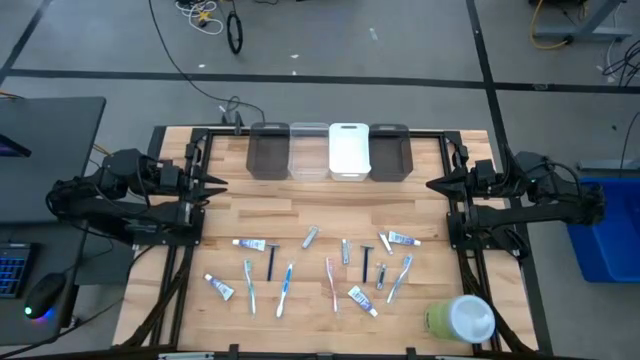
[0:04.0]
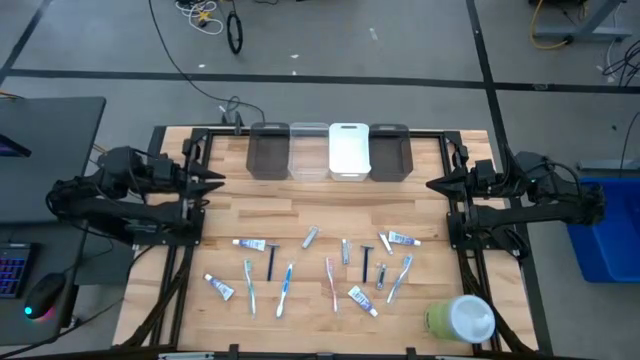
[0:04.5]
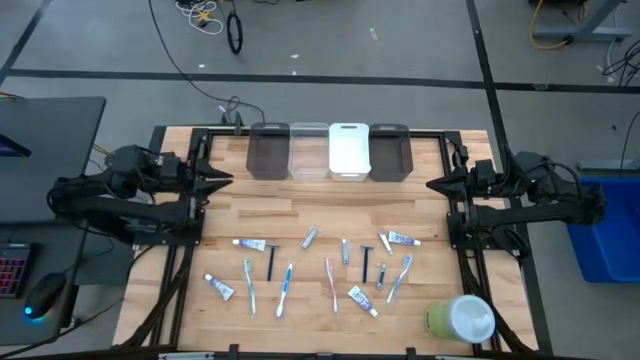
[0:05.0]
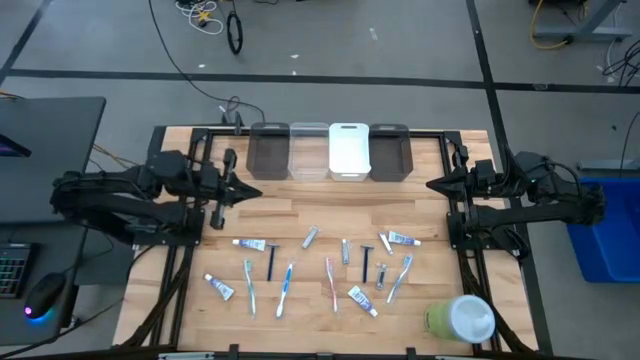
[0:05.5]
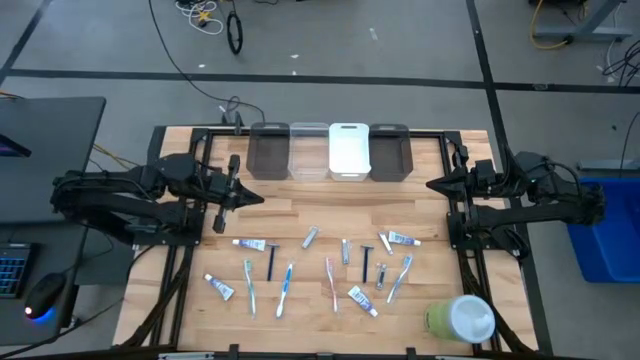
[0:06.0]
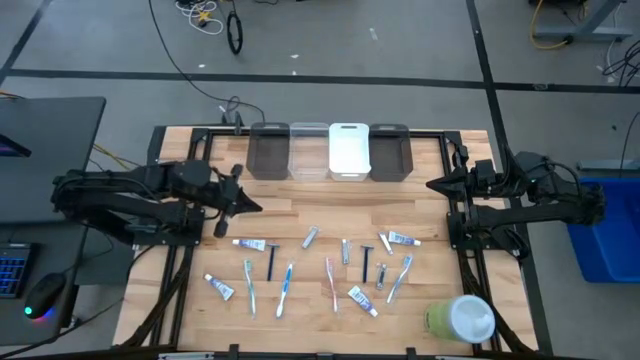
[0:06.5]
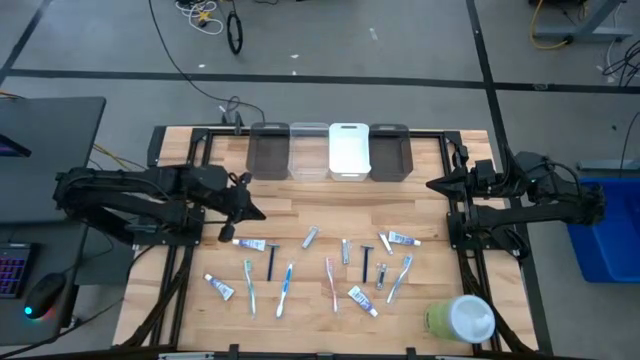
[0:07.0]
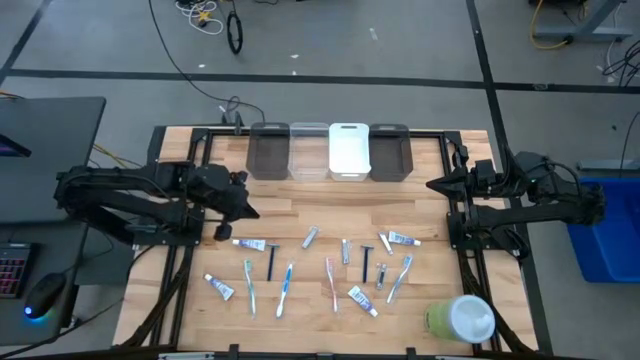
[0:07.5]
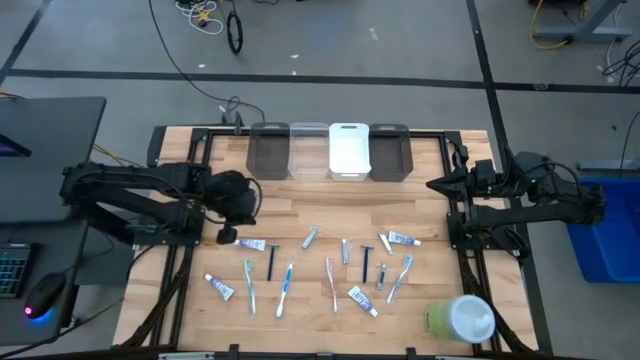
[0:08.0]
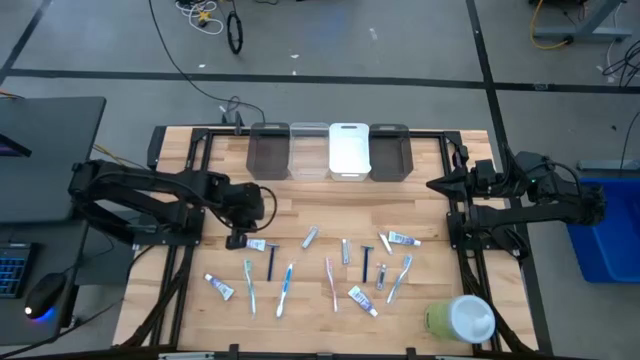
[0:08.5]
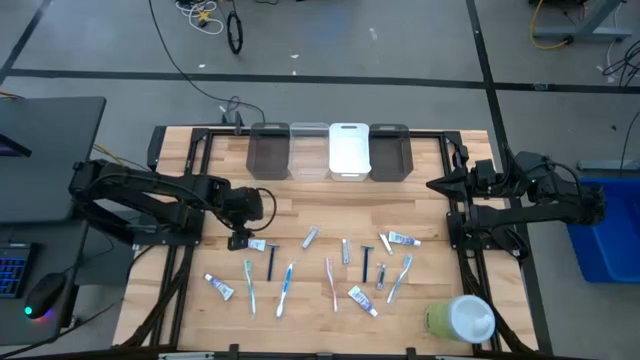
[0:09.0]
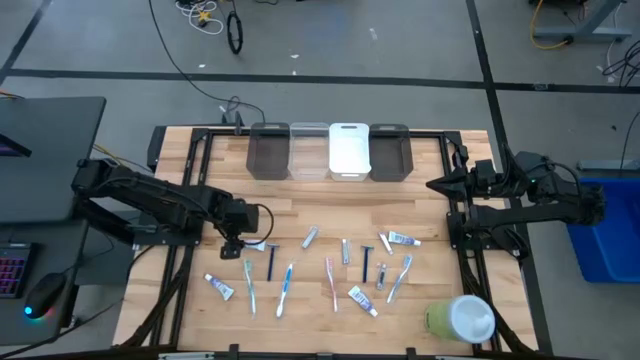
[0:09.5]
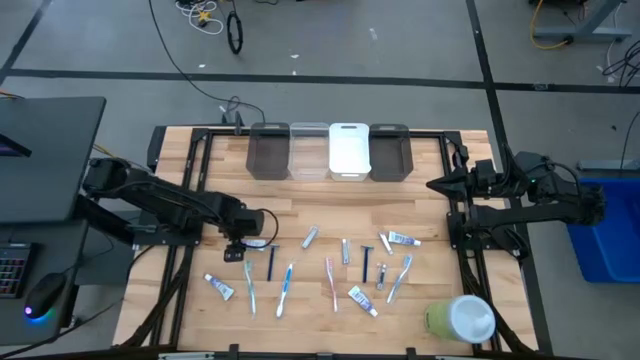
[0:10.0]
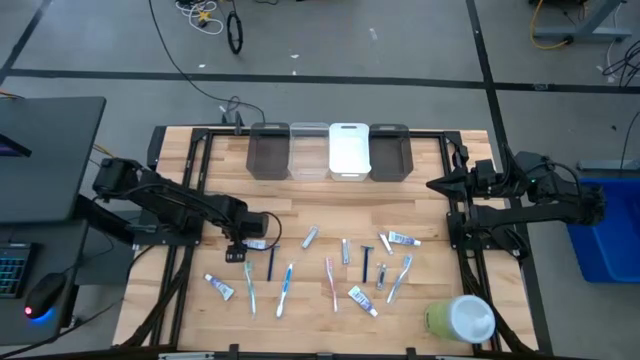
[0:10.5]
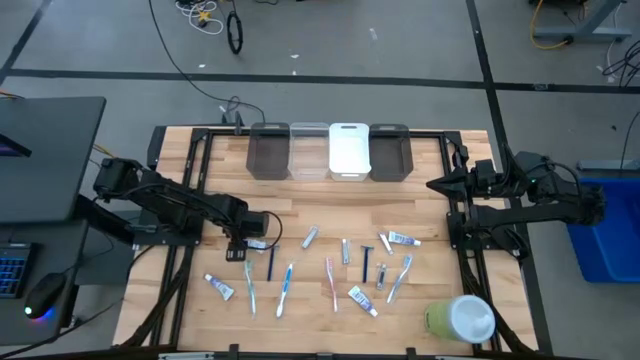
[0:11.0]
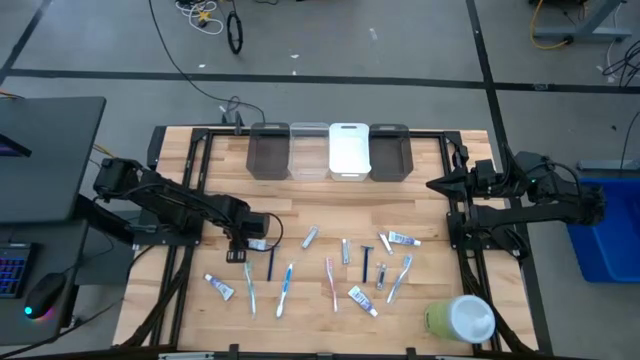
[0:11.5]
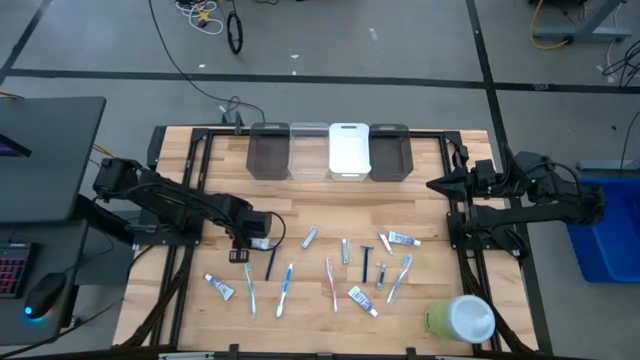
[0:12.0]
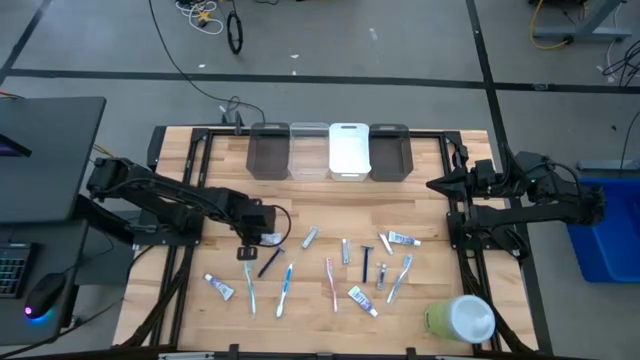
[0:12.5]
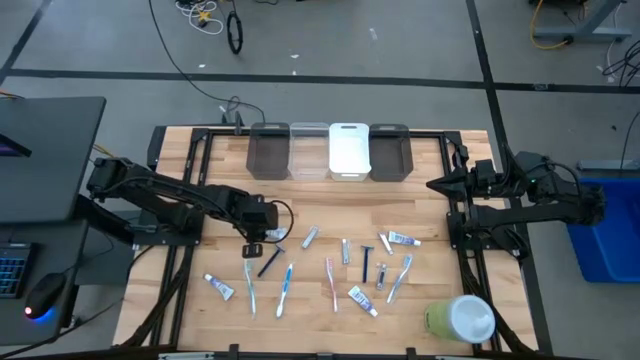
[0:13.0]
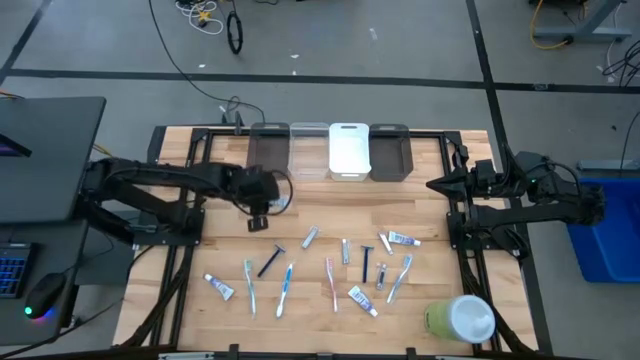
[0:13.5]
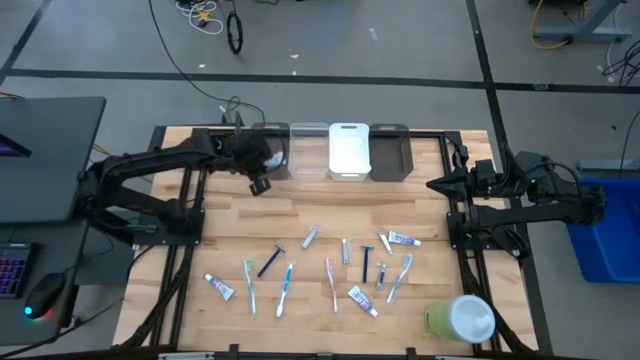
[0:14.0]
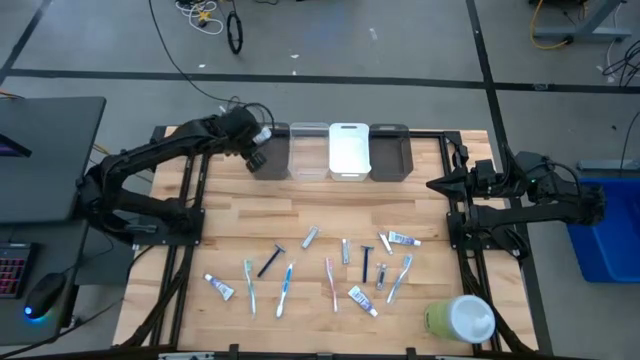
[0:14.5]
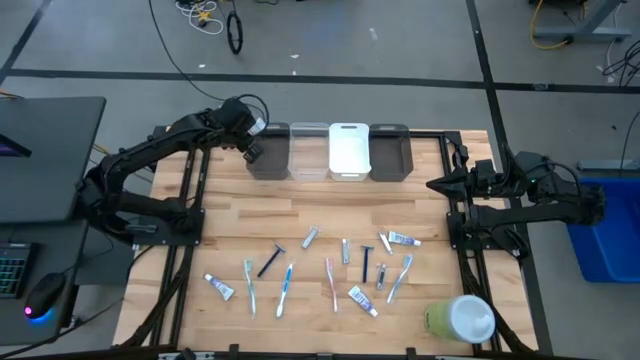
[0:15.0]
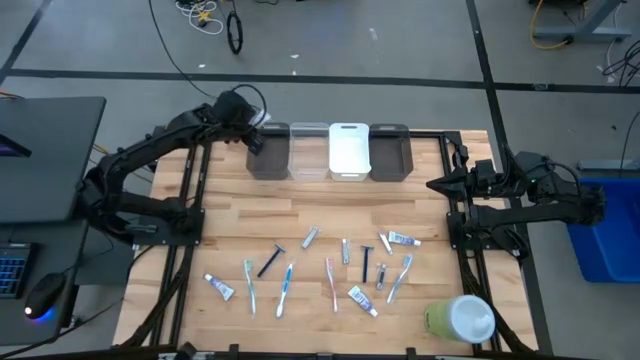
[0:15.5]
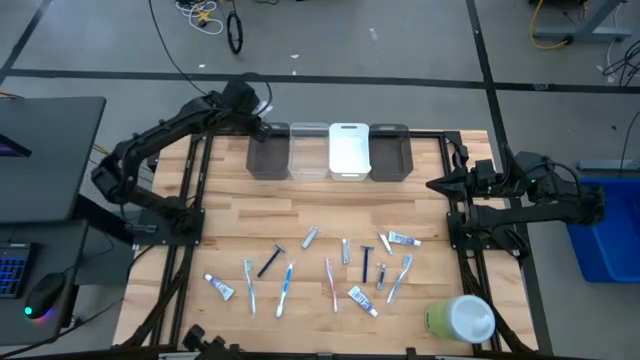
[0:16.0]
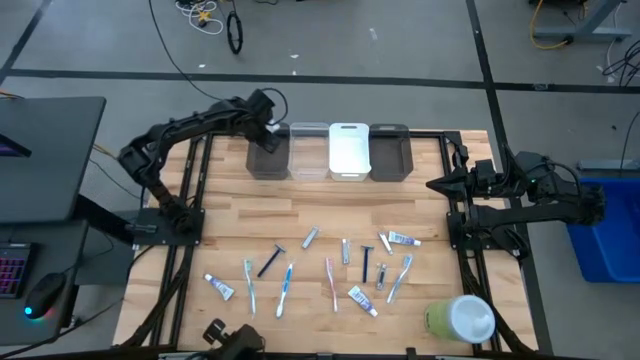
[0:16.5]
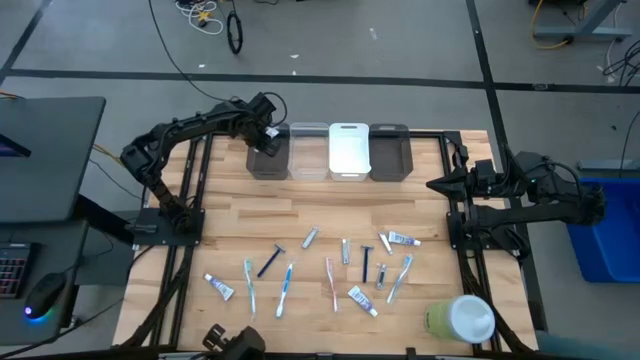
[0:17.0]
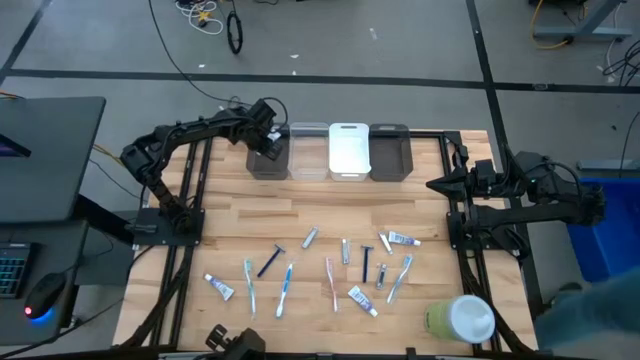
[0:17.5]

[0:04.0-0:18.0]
Task: Pick & Place Travel size toiletries
Put the white toothpaste into the left black bin
